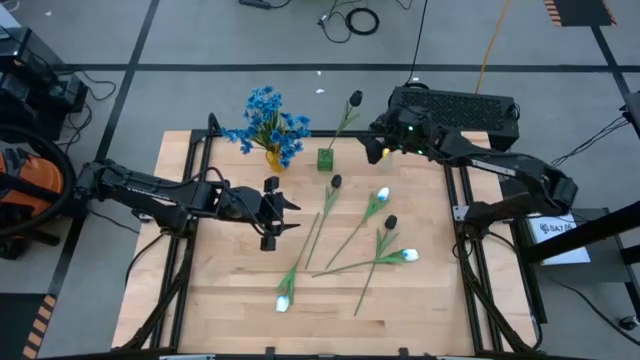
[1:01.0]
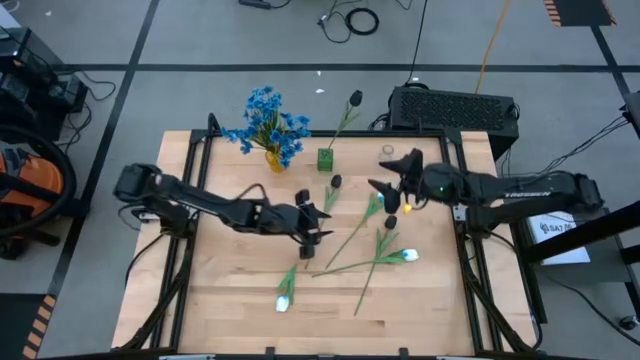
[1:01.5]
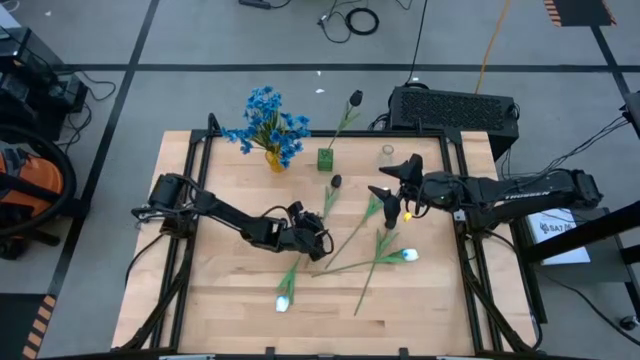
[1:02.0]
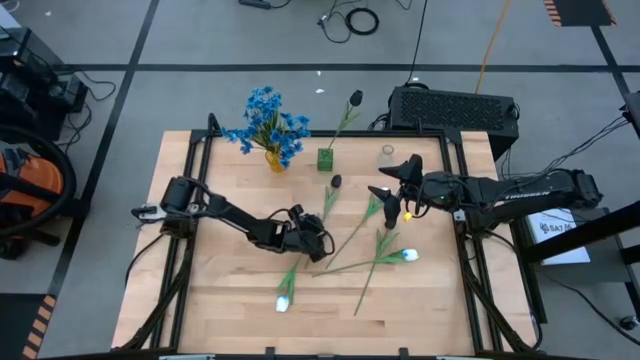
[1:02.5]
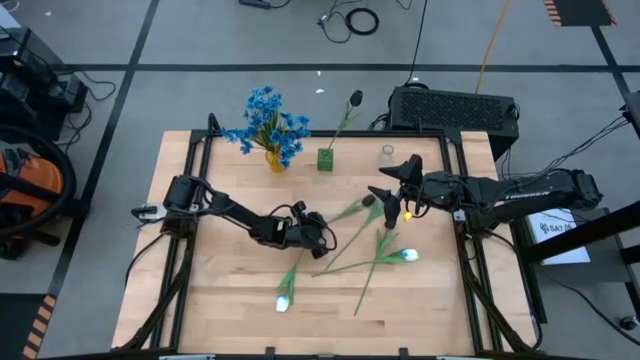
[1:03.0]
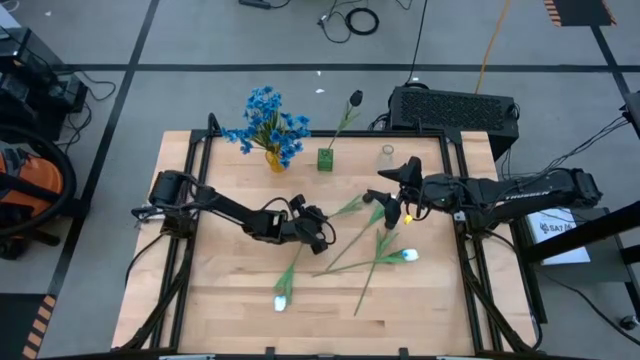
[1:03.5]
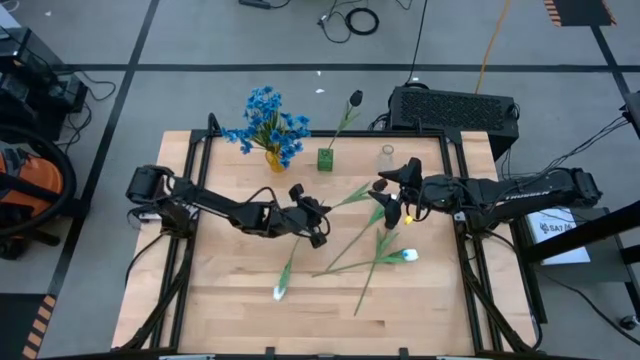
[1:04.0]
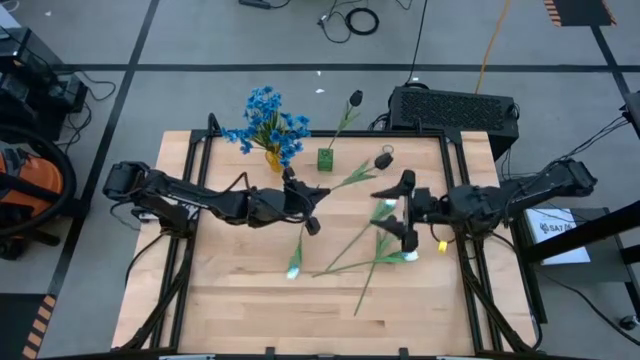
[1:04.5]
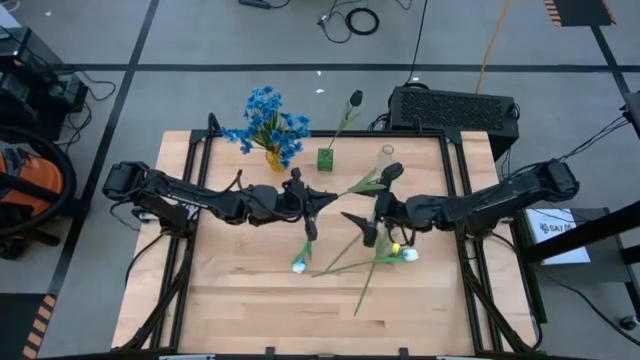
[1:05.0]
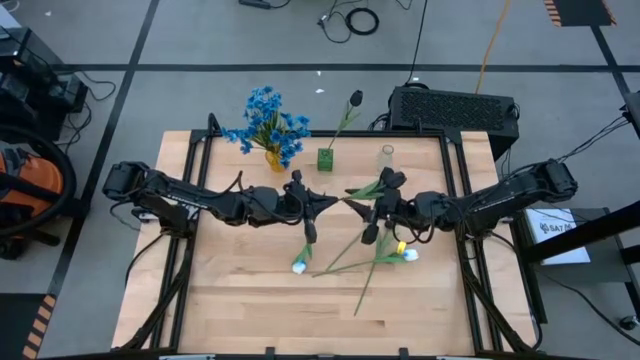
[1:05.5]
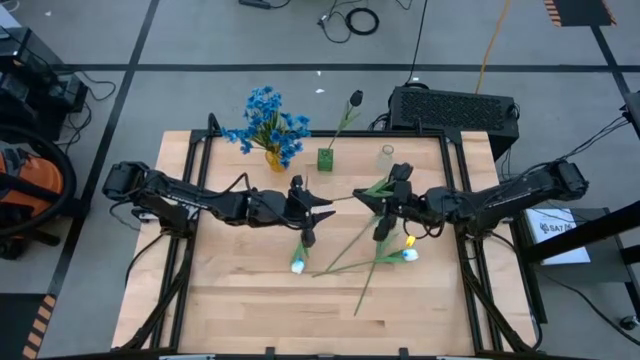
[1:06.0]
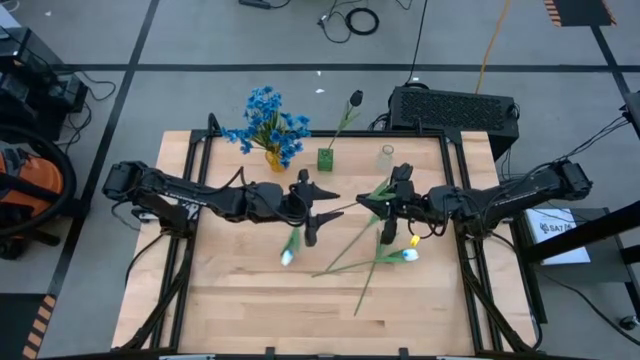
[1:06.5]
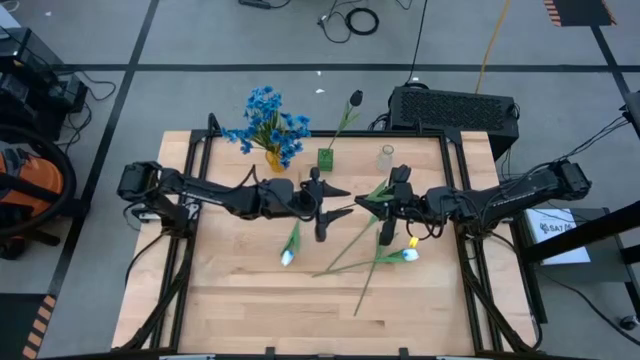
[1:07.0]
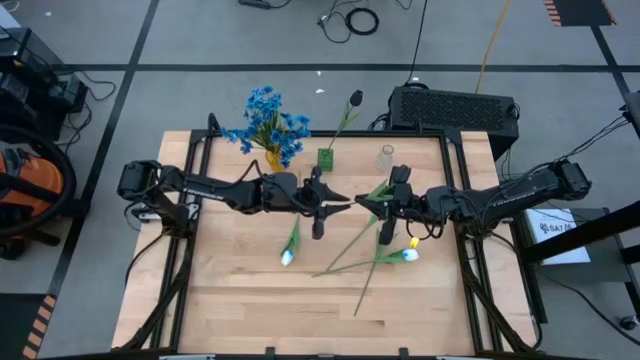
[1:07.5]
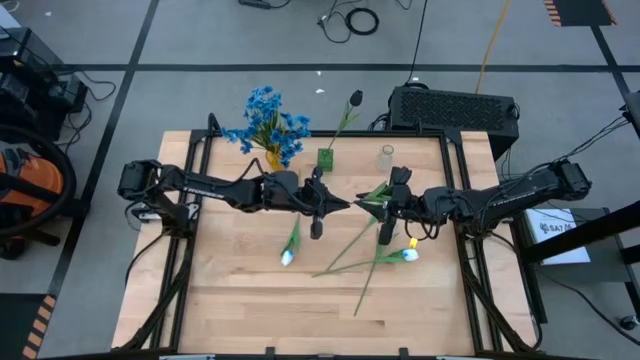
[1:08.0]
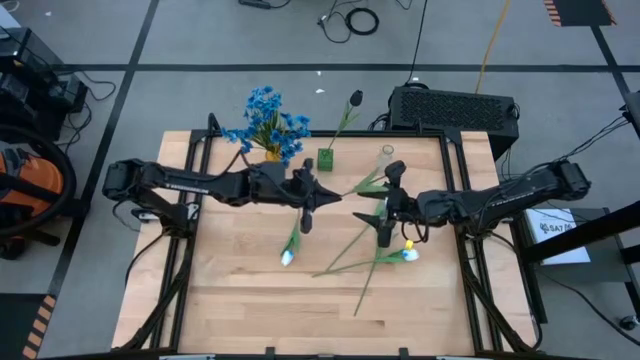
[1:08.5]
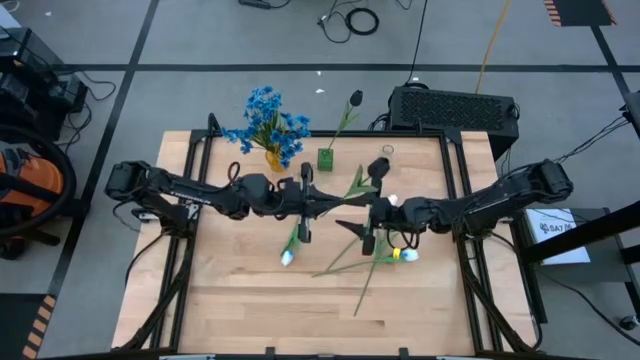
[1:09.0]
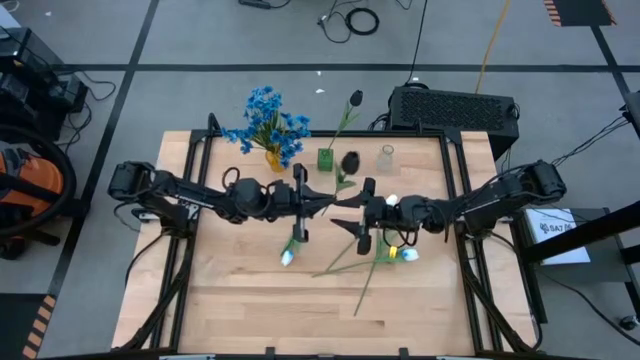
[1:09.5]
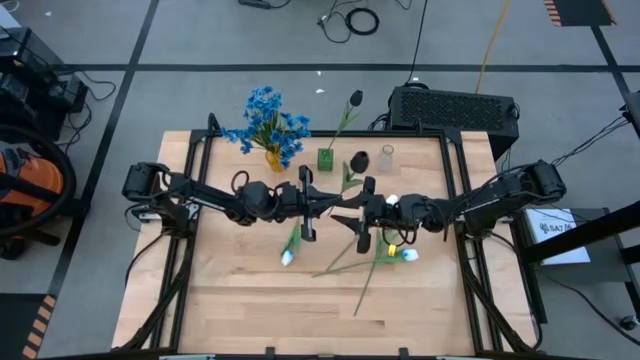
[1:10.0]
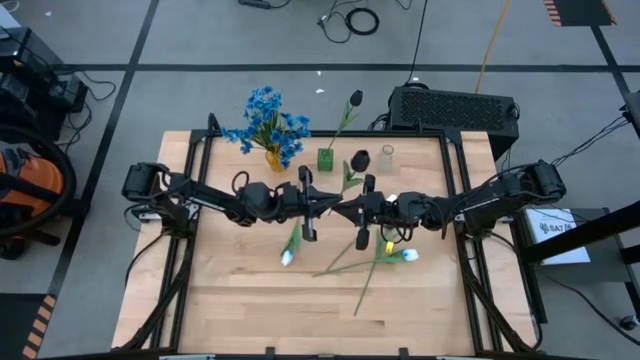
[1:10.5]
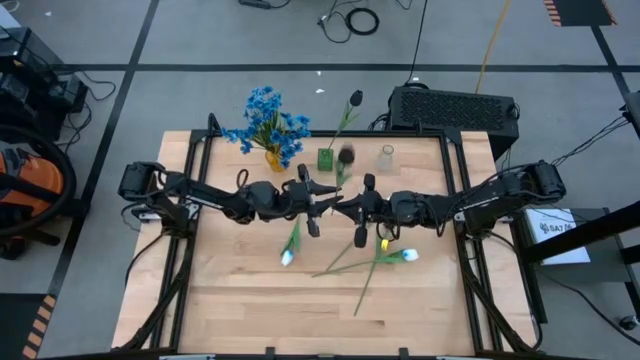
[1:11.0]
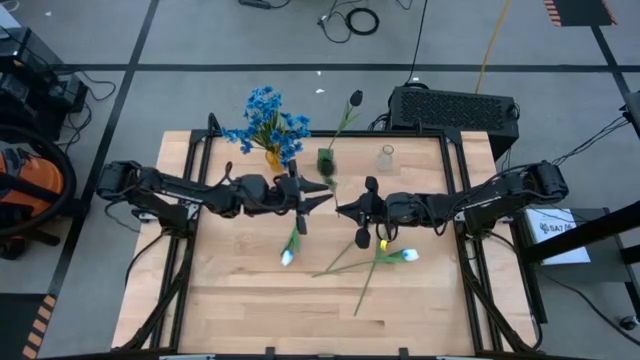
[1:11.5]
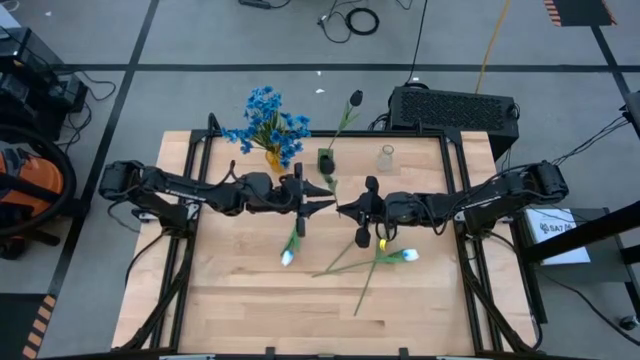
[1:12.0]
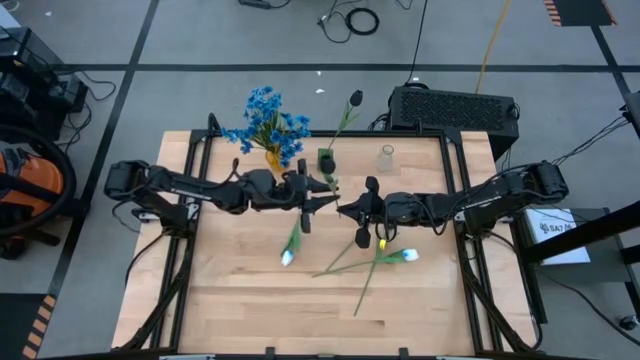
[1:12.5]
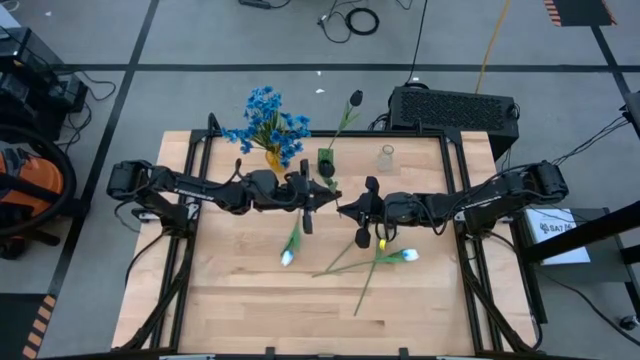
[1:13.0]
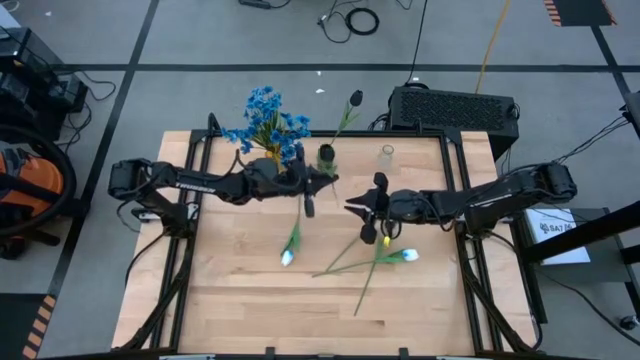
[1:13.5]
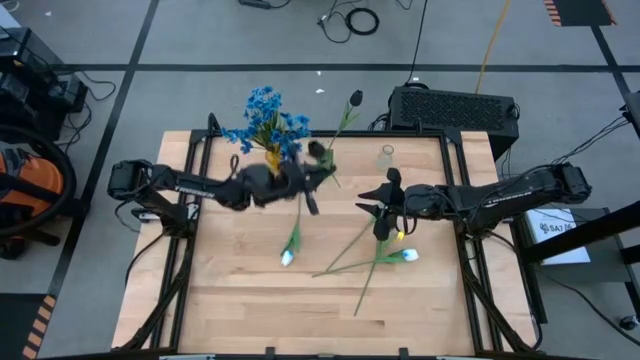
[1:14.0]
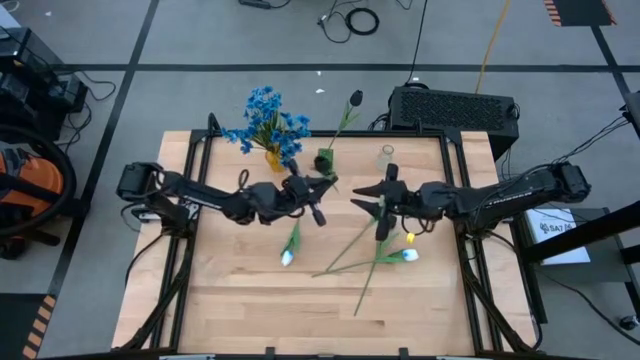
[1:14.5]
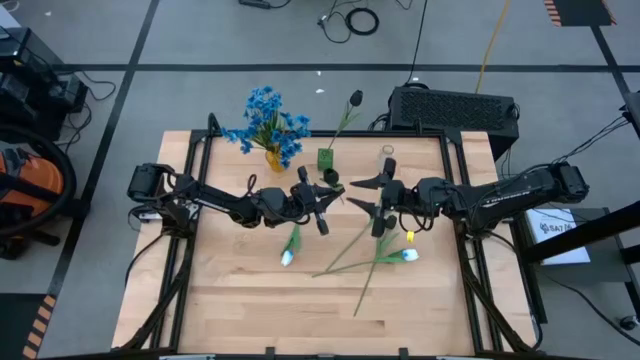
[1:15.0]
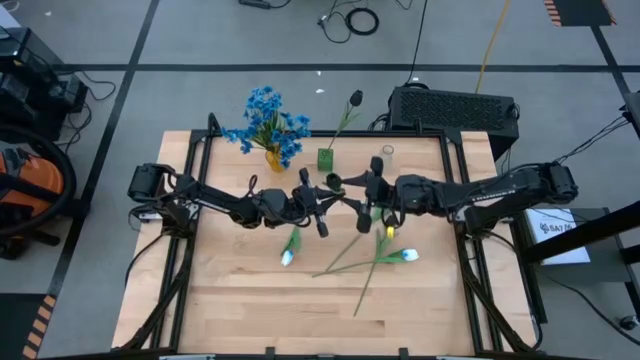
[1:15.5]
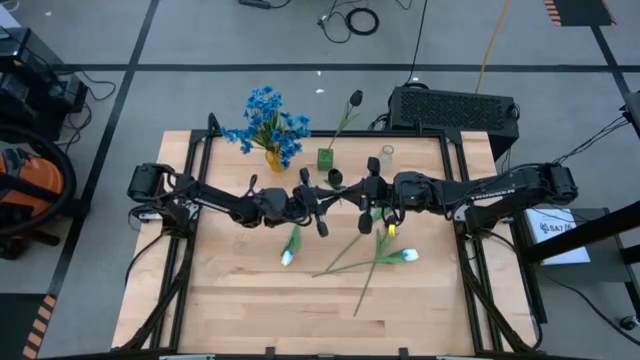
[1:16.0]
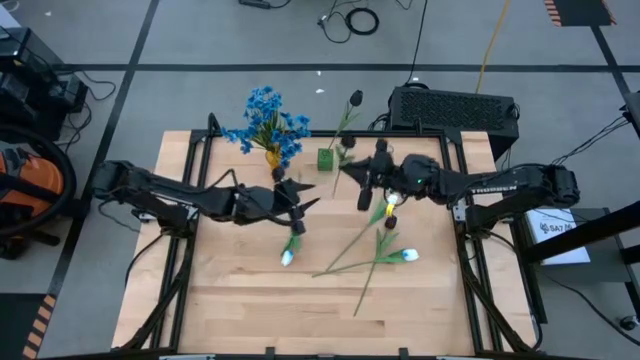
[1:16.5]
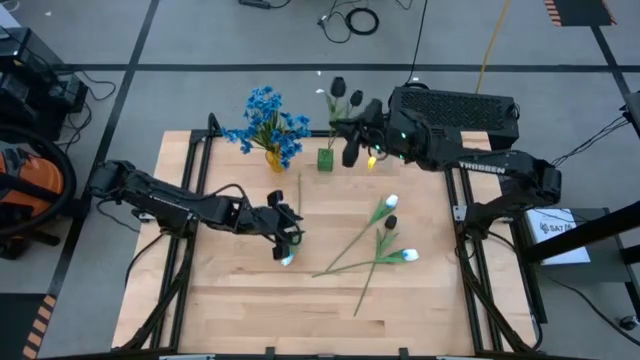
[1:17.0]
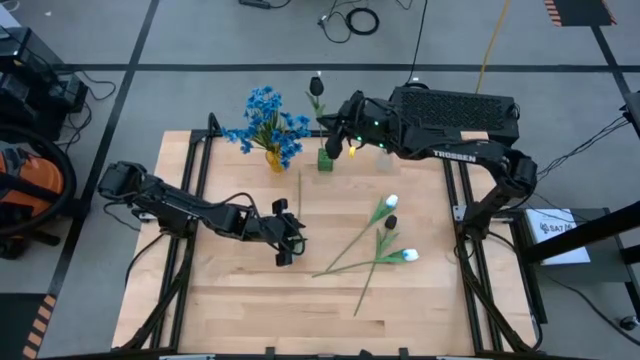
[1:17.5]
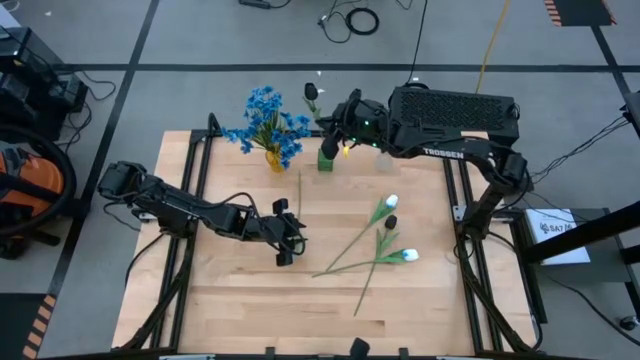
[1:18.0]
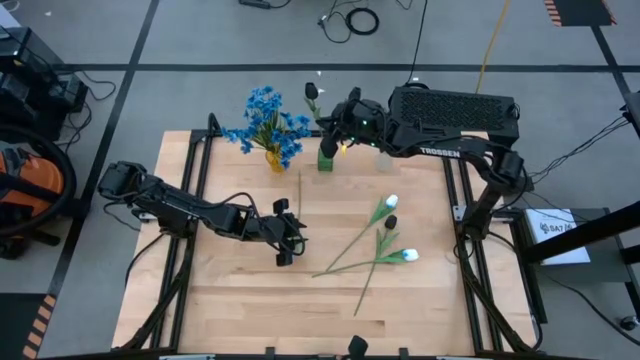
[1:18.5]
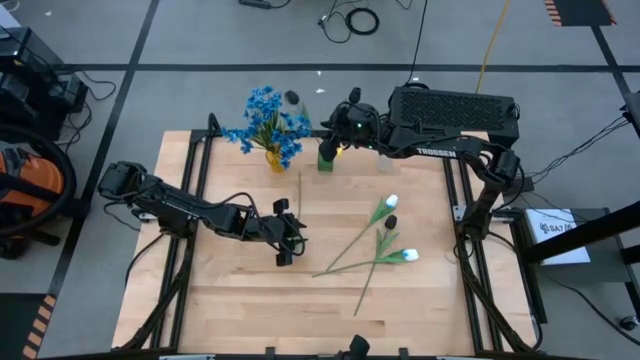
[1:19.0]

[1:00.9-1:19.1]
Task: Sort flowers into vase by color
Put the top black tulip into the green vase

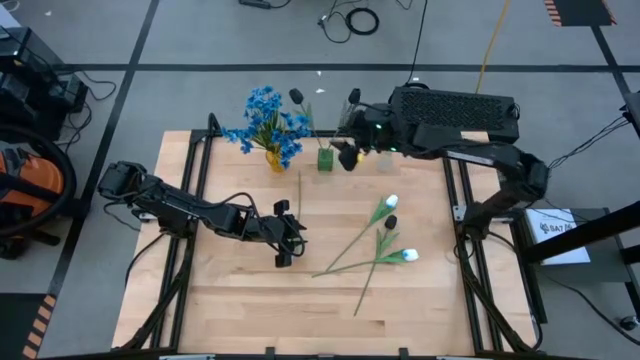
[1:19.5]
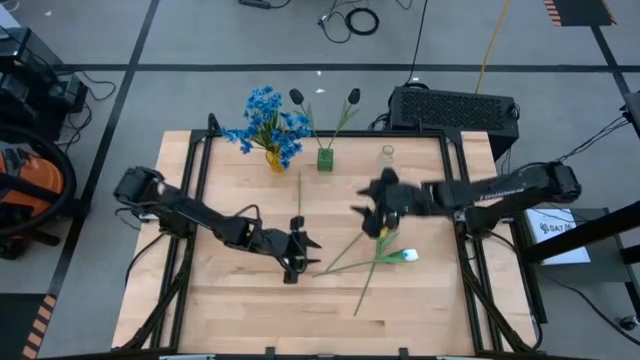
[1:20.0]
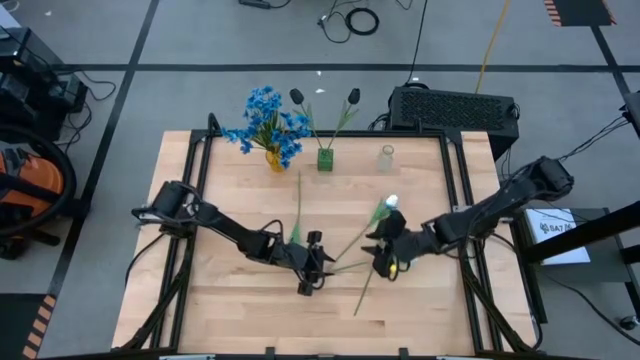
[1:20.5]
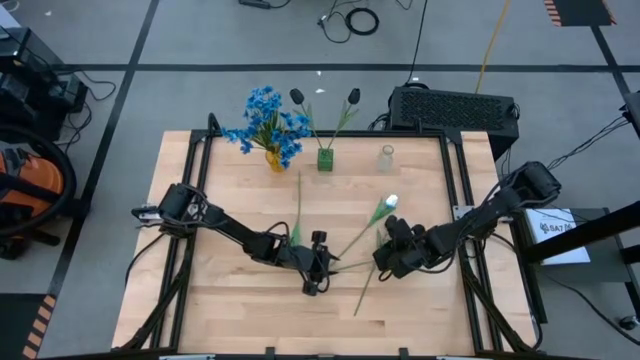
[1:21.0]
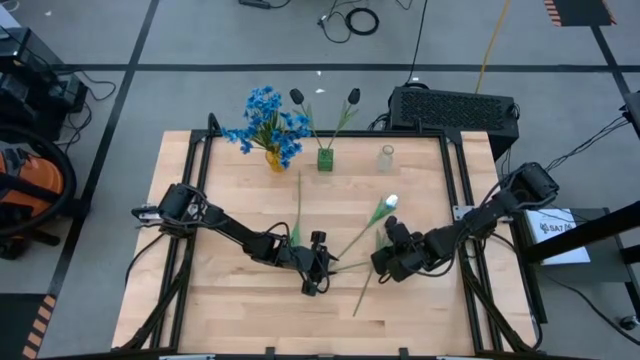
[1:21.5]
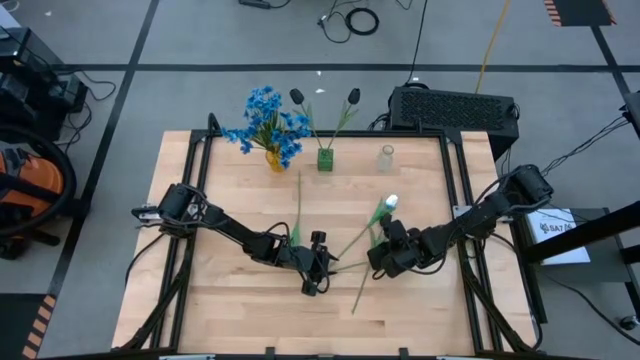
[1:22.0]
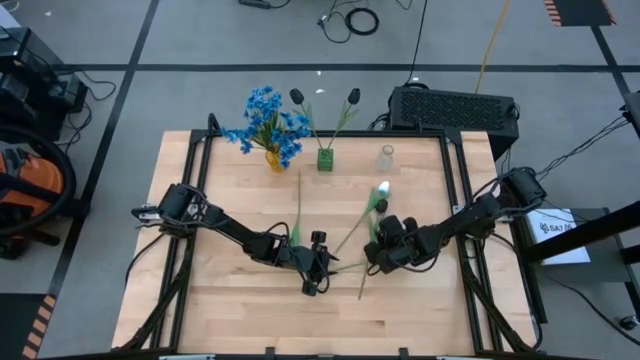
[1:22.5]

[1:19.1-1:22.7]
Put the black tulip into the green vase
